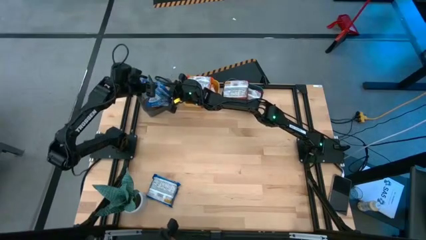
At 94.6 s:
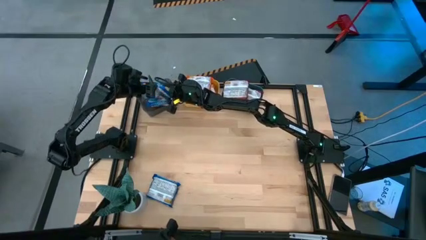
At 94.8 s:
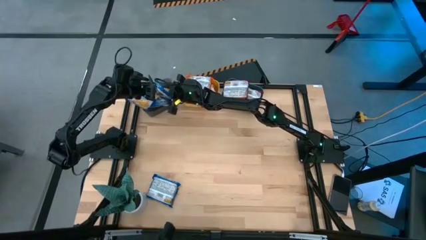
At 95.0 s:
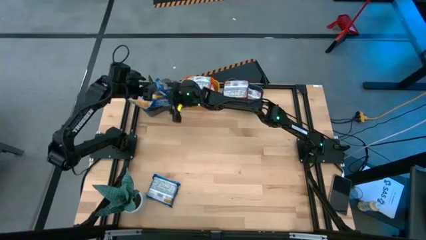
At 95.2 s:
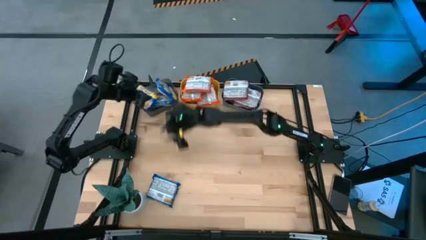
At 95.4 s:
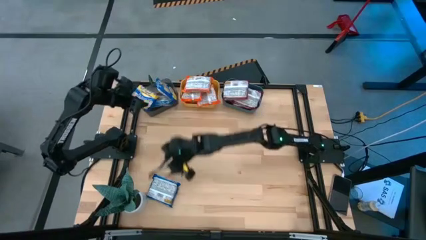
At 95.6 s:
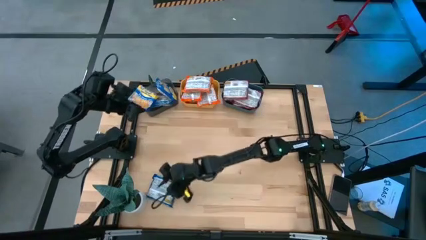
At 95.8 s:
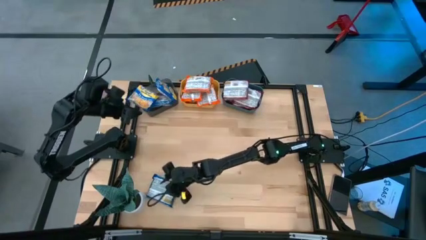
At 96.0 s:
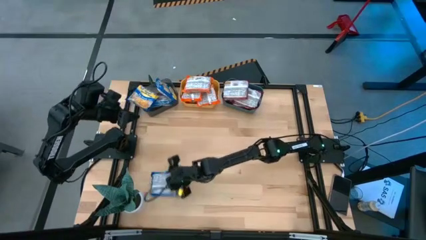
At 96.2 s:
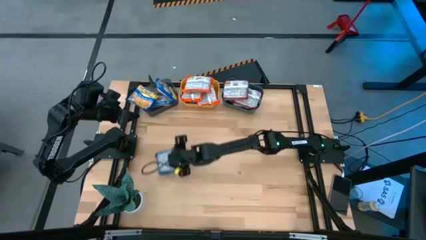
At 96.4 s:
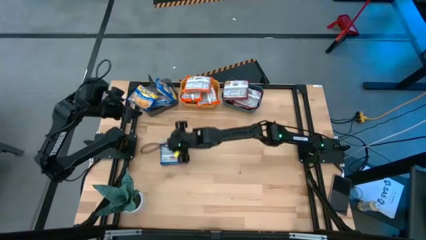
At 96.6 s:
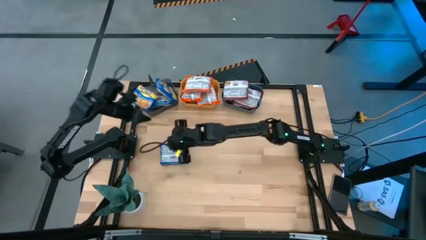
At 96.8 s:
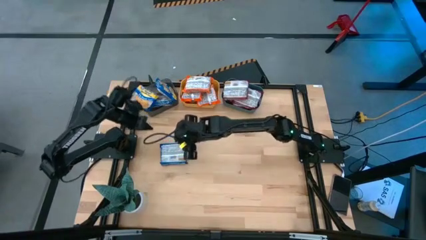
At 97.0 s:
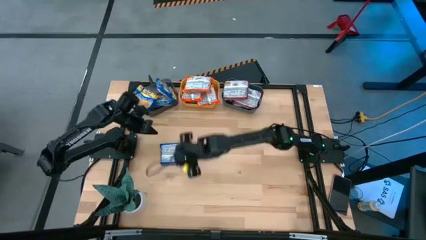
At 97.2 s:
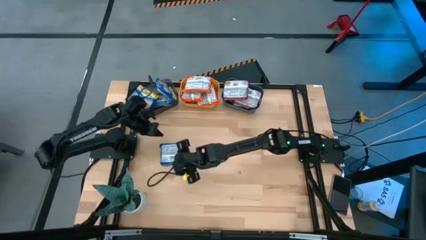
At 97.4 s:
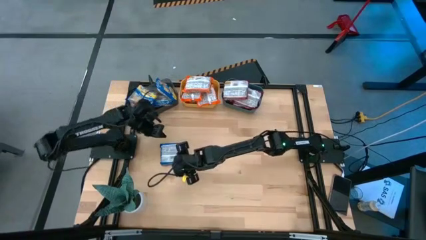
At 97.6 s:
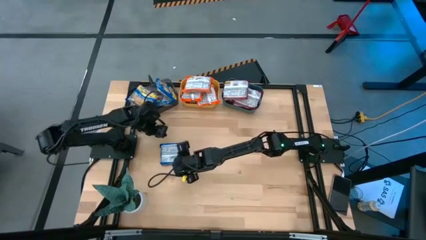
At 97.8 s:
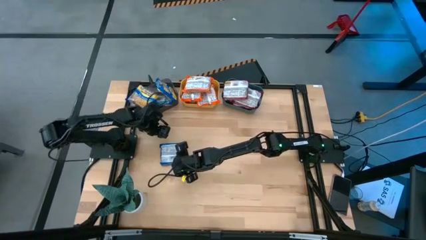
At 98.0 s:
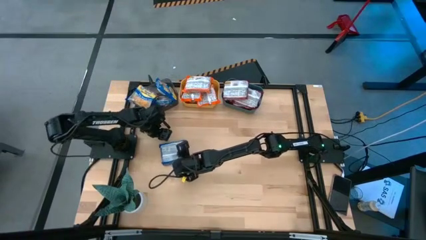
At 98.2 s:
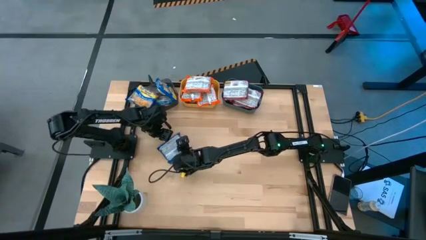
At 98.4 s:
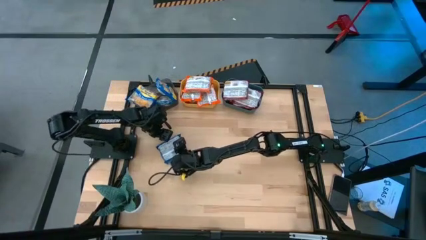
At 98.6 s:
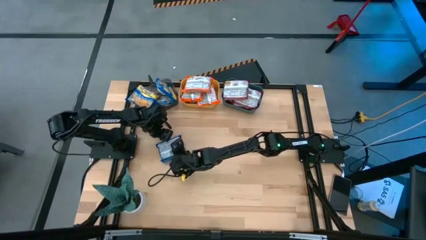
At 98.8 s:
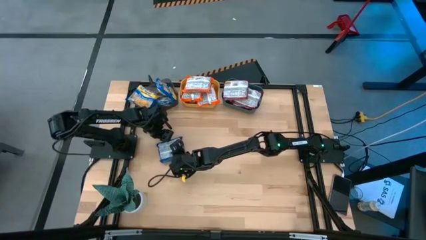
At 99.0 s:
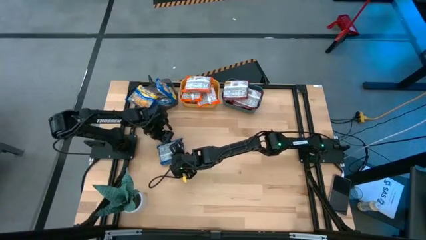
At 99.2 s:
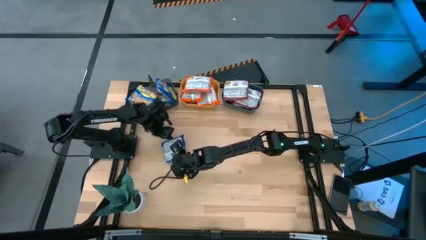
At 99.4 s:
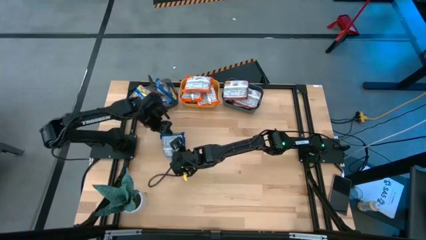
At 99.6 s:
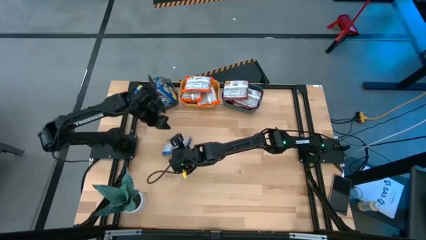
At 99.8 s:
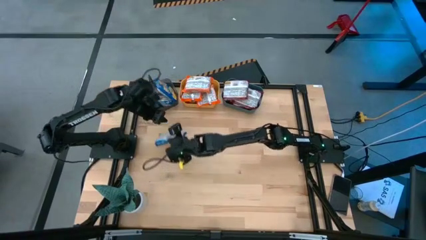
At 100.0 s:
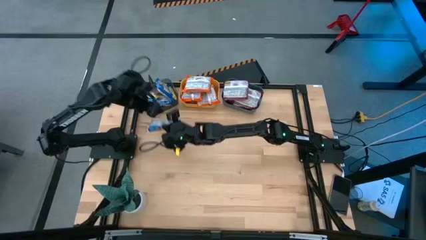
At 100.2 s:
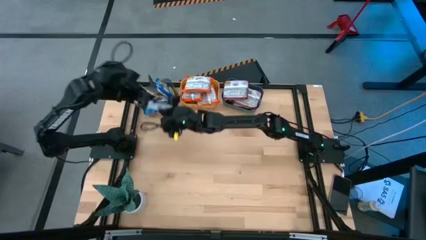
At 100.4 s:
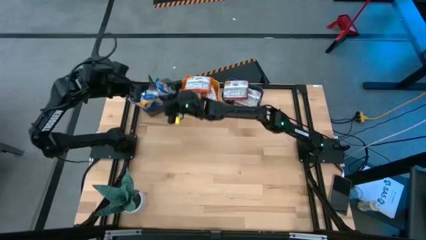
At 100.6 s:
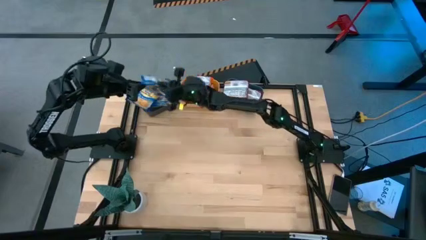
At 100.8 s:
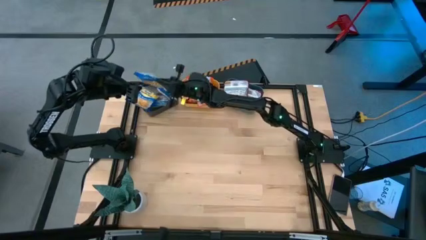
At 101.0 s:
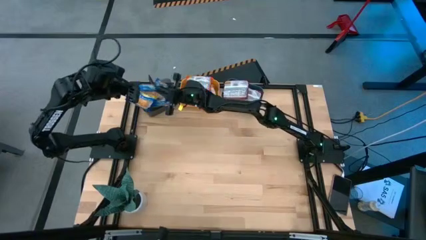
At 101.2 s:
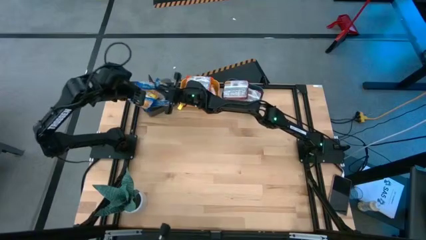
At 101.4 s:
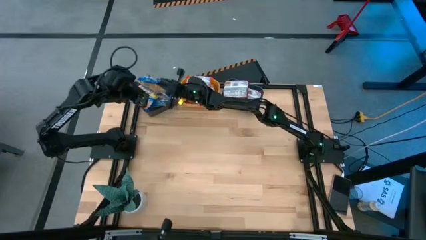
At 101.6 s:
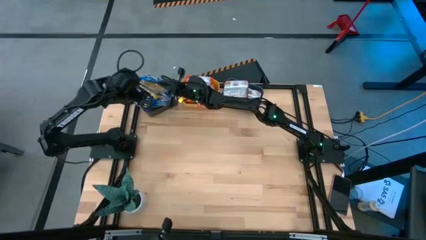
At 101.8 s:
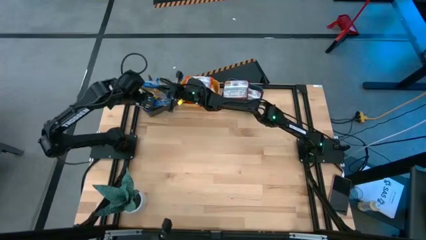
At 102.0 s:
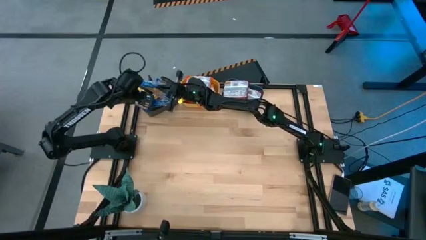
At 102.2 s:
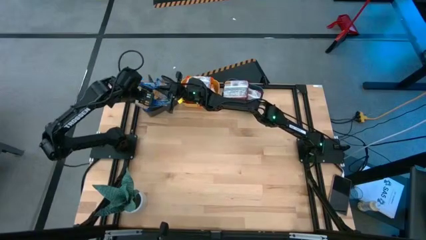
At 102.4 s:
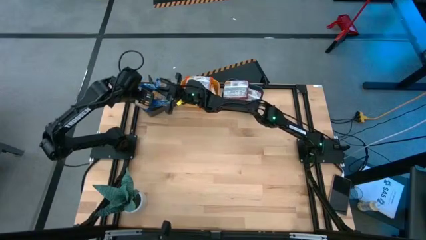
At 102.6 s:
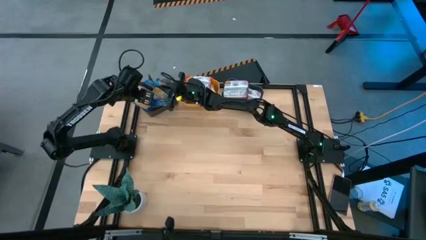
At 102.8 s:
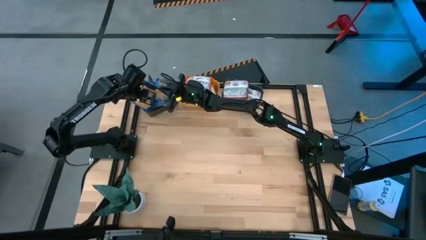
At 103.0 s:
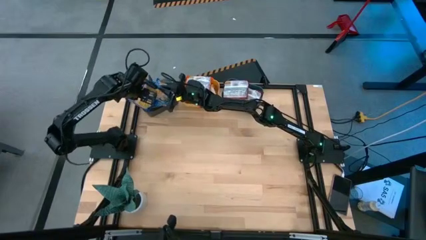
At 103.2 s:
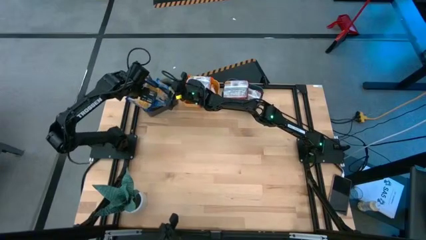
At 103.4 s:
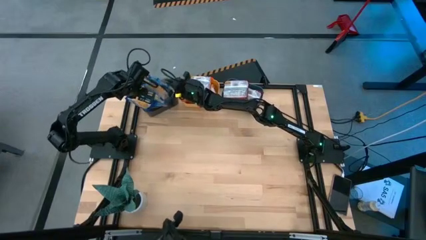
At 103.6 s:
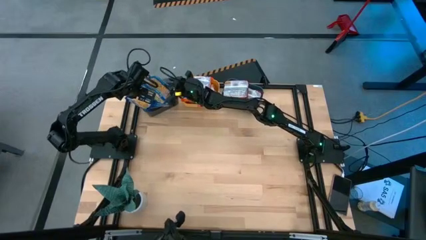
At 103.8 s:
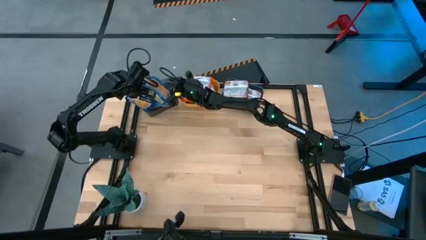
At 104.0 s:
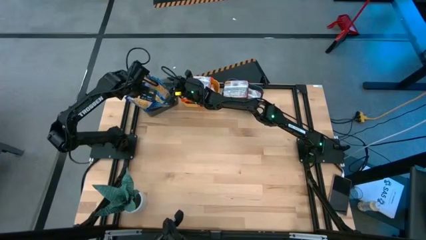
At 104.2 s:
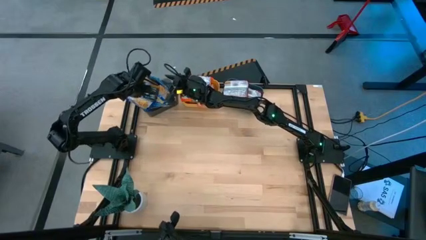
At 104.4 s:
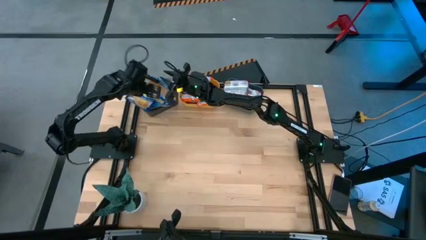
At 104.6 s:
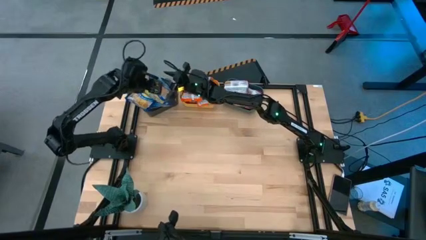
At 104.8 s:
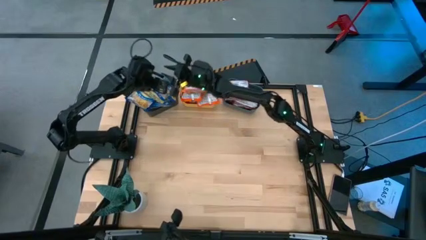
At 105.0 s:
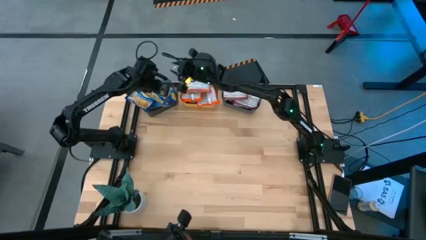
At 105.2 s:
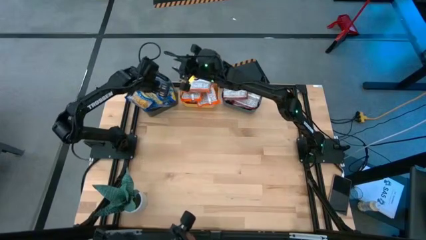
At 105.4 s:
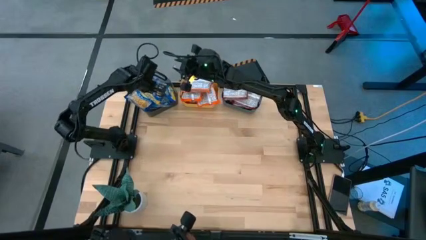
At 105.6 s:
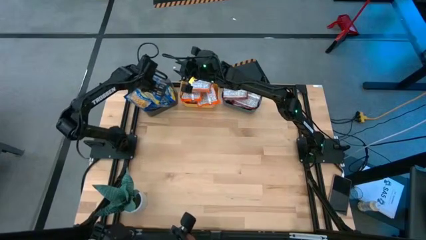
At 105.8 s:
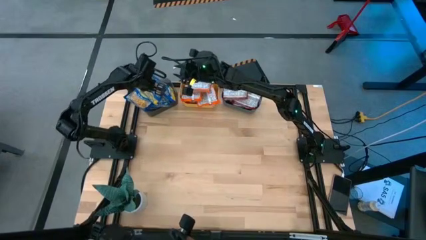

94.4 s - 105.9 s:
Task: Sort Maruchan noodles
Put the blue noodle pack into the black bin

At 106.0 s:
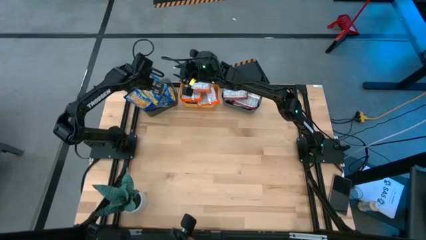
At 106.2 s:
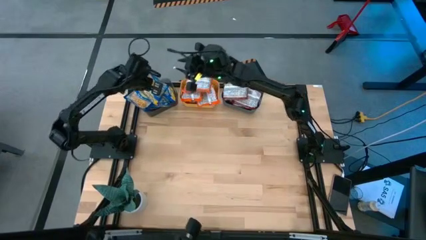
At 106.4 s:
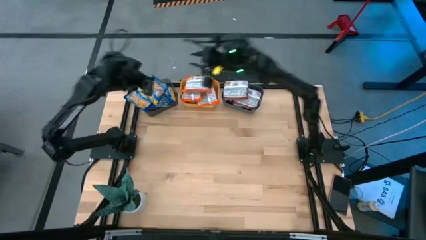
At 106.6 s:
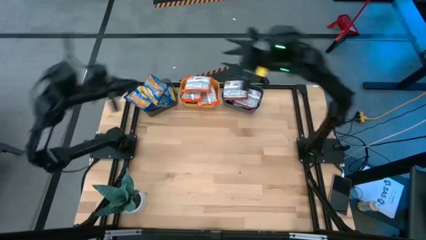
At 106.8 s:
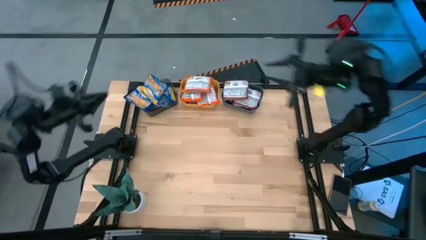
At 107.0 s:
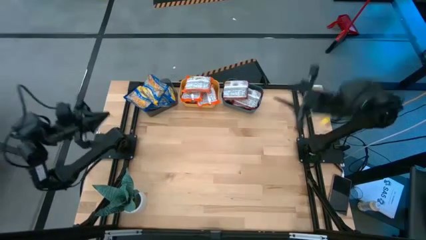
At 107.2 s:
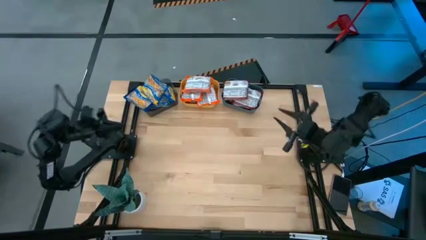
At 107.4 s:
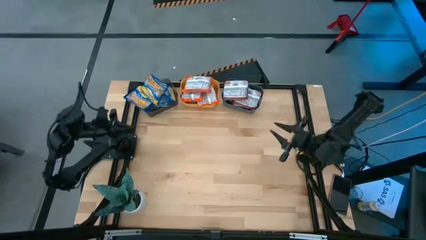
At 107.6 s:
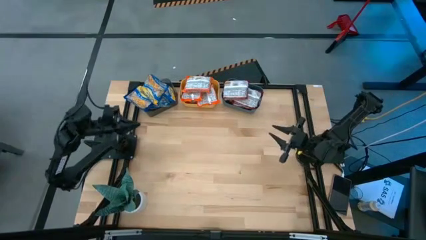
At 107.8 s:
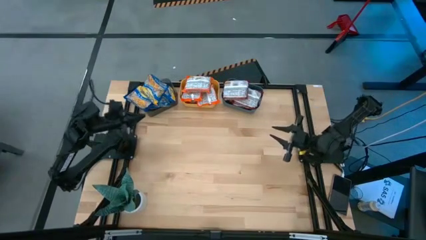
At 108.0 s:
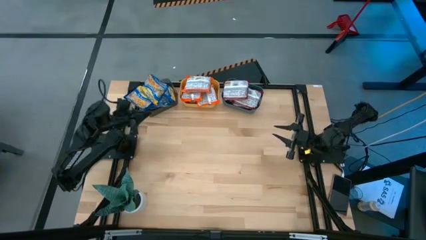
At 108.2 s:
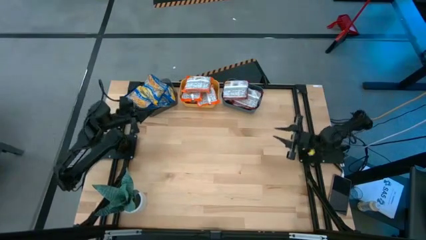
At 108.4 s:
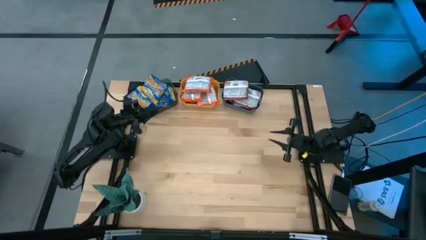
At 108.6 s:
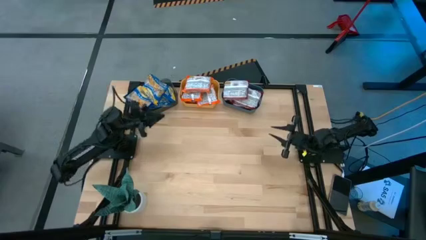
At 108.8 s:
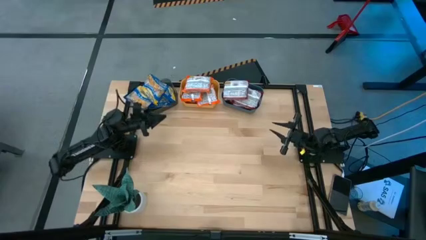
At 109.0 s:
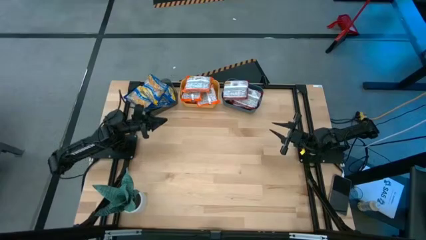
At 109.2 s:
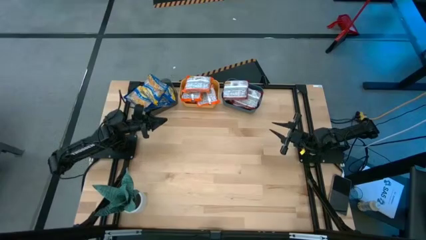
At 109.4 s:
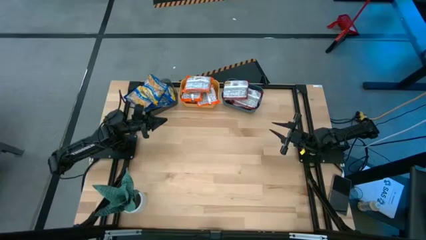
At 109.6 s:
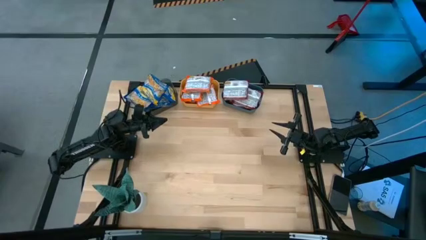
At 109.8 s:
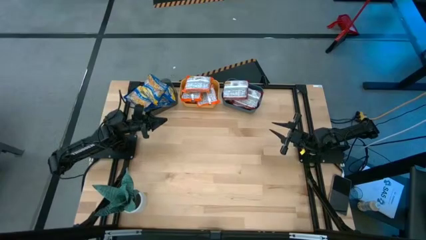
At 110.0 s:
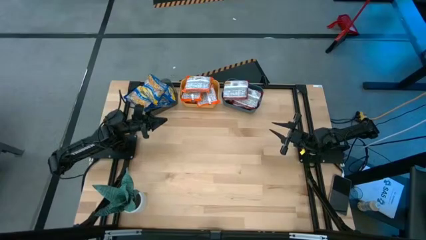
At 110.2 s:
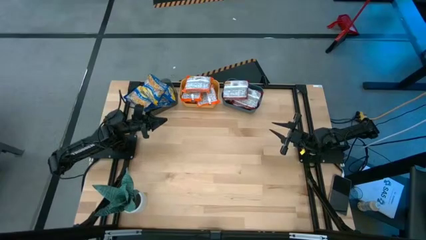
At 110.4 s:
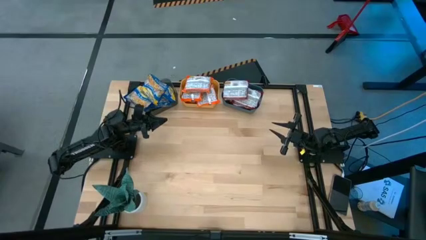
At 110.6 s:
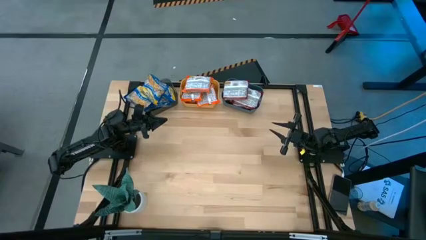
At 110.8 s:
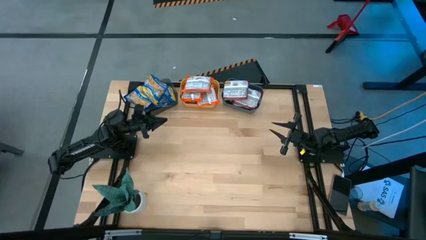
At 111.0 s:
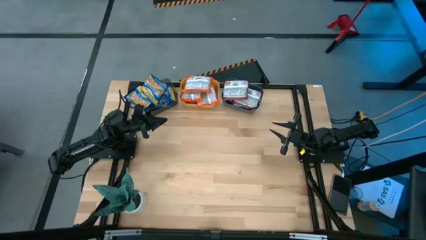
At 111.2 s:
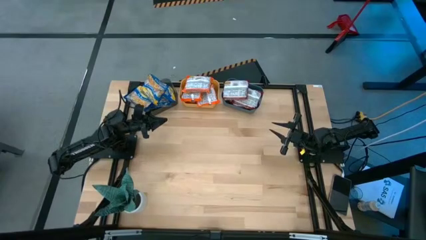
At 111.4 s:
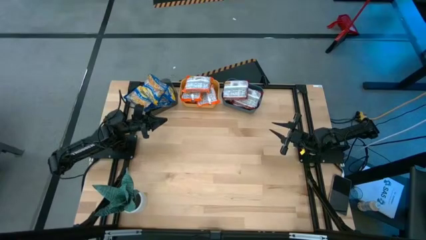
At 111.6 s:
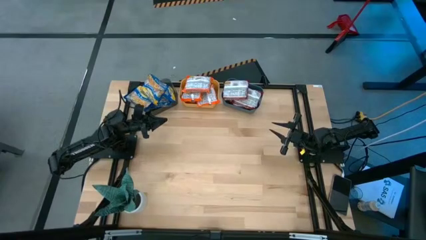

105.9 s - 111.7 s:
Return to Home Position
